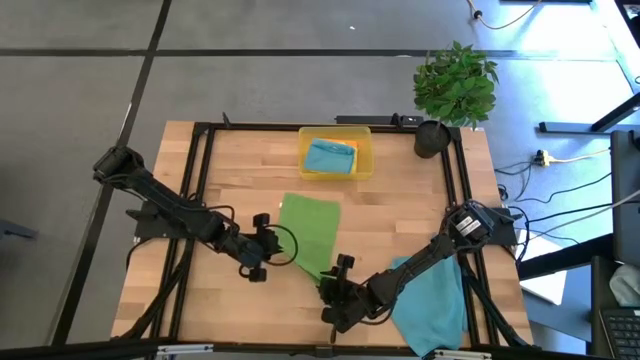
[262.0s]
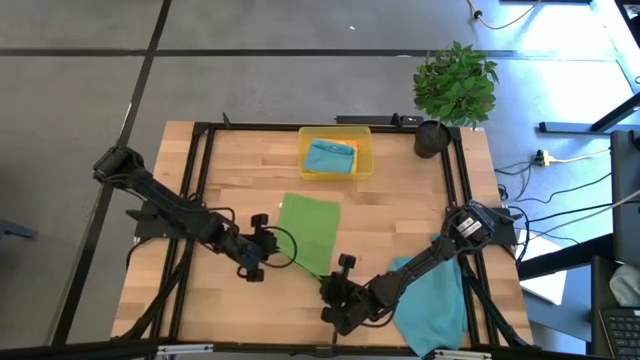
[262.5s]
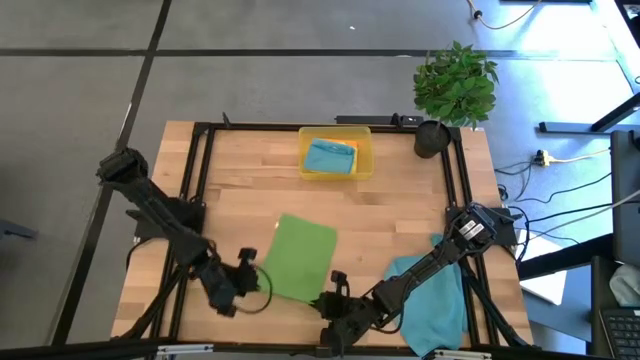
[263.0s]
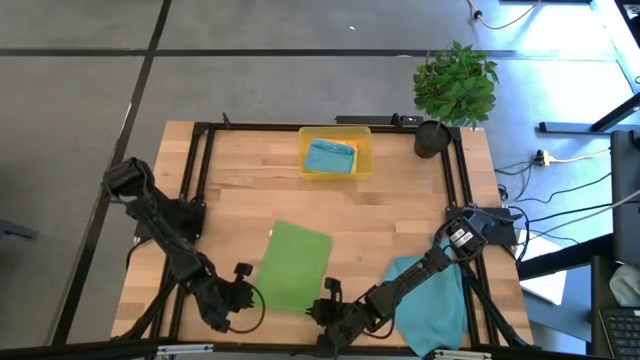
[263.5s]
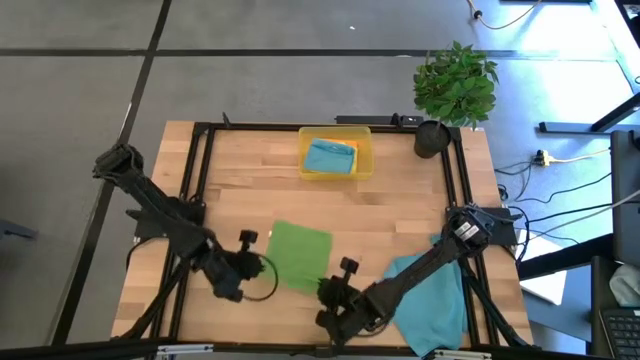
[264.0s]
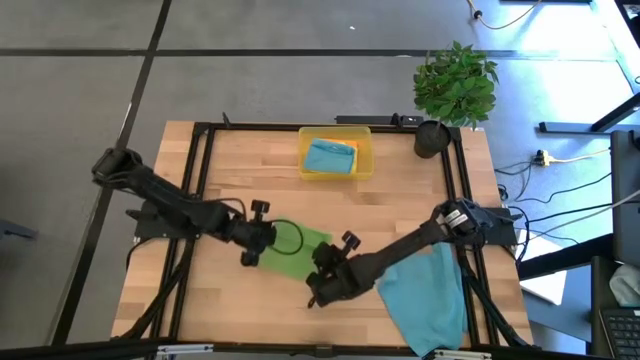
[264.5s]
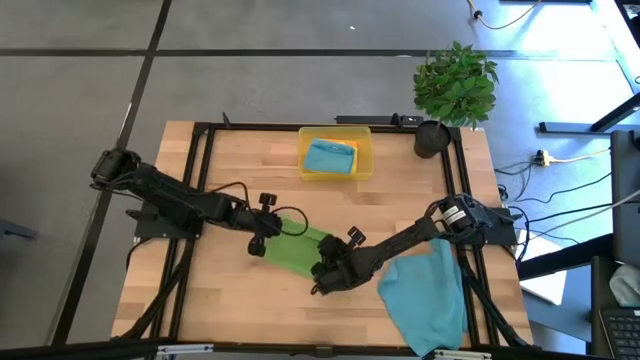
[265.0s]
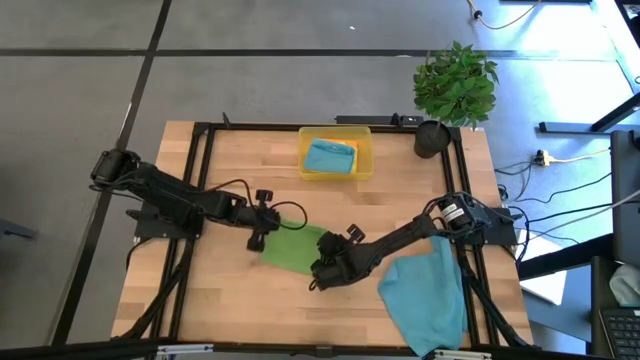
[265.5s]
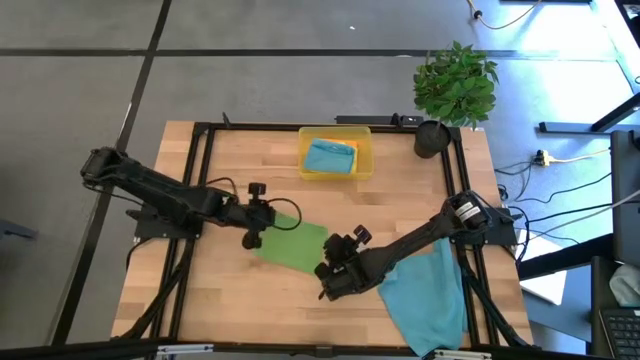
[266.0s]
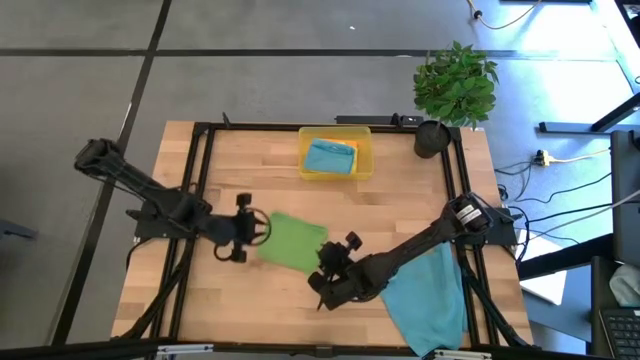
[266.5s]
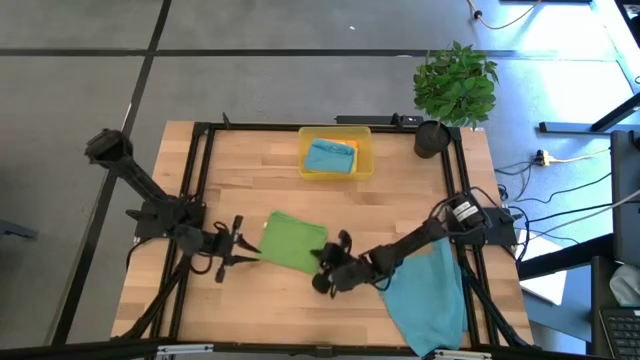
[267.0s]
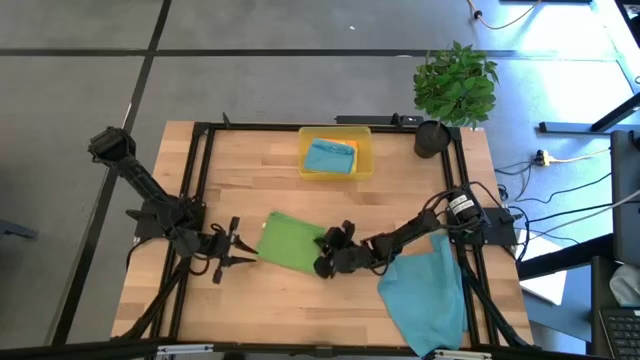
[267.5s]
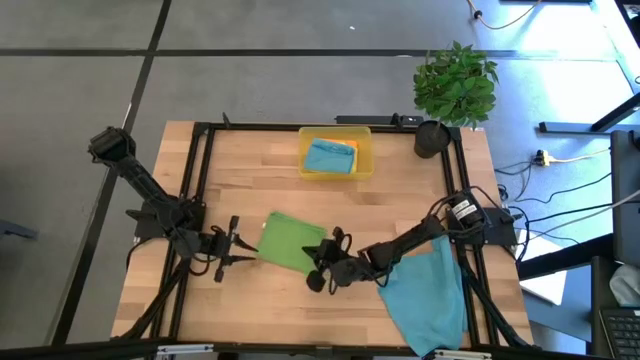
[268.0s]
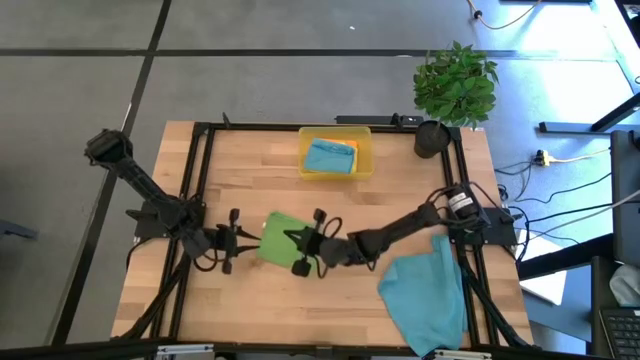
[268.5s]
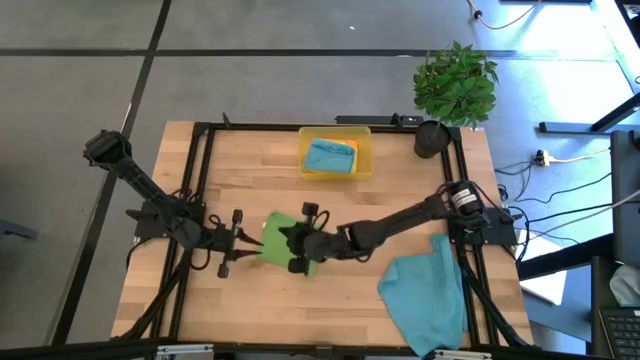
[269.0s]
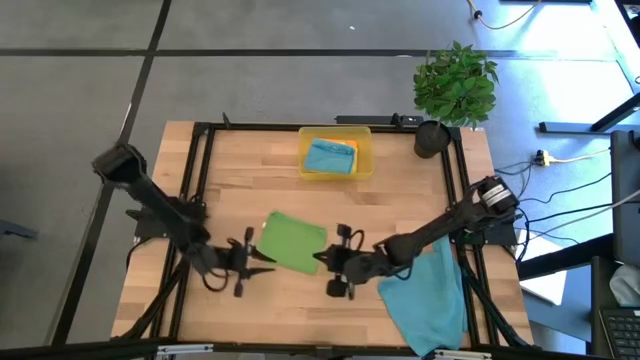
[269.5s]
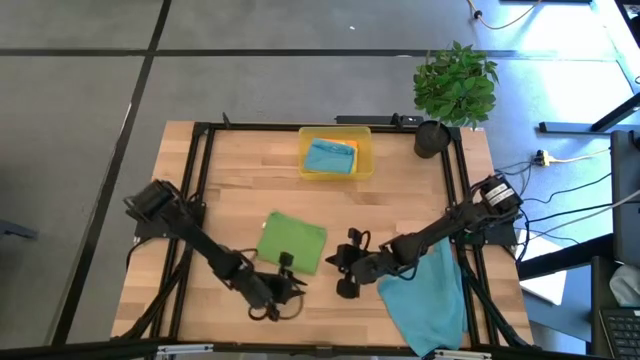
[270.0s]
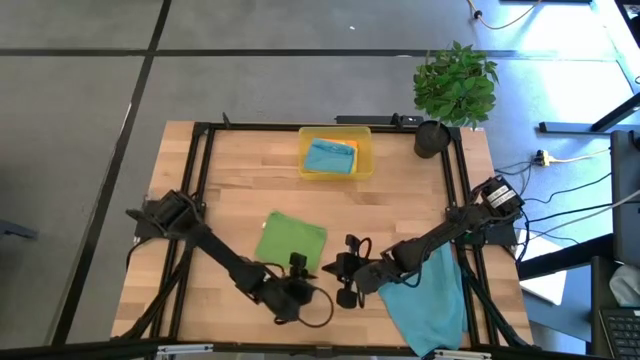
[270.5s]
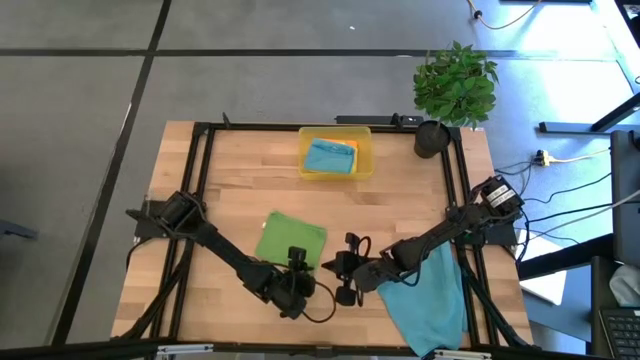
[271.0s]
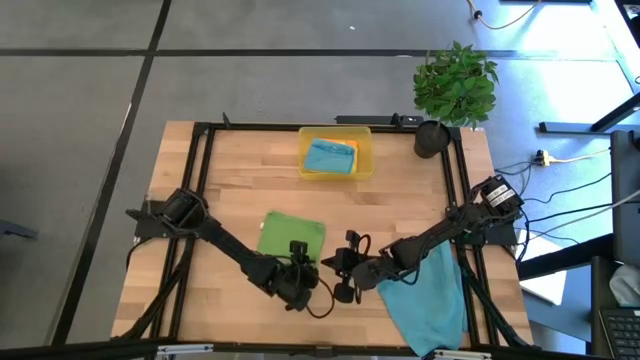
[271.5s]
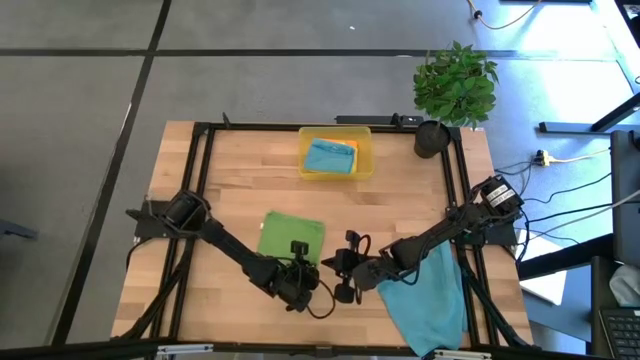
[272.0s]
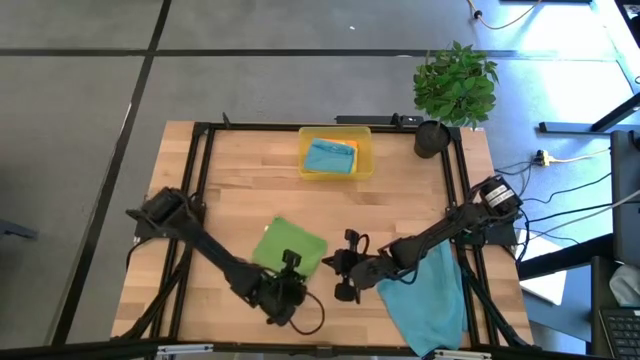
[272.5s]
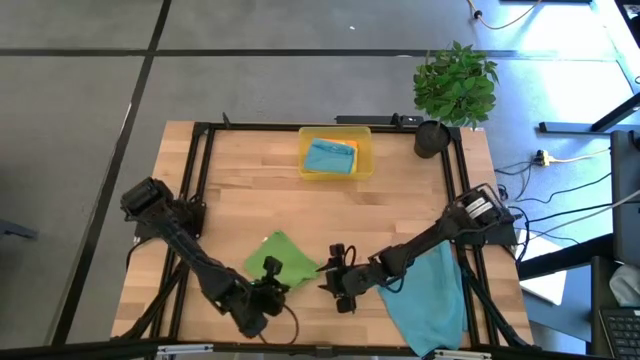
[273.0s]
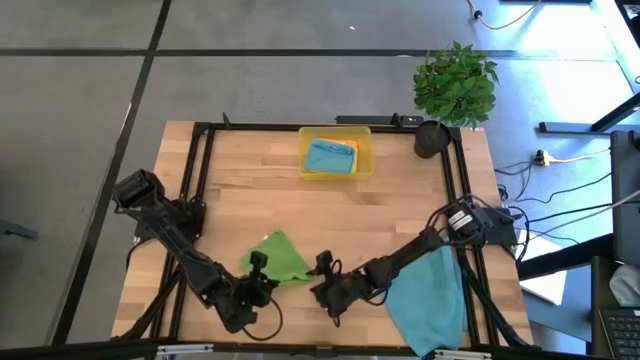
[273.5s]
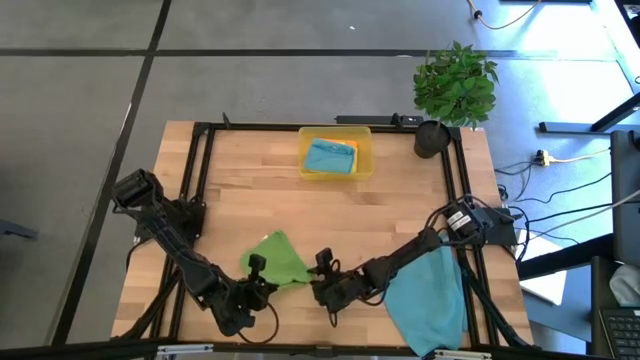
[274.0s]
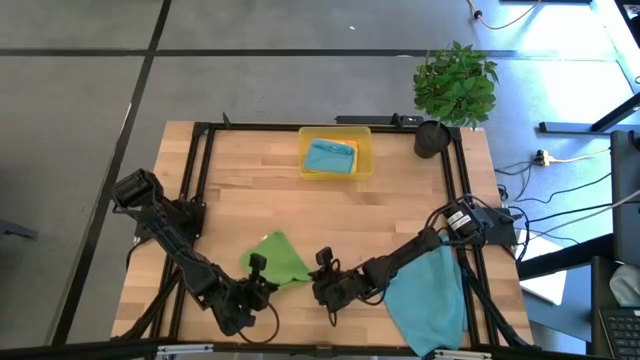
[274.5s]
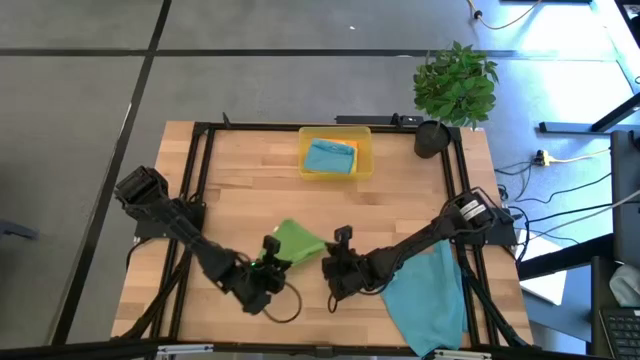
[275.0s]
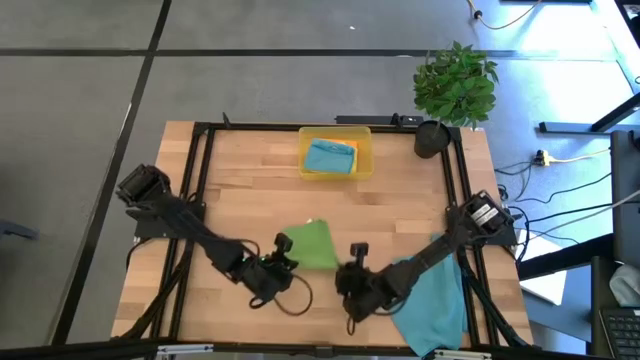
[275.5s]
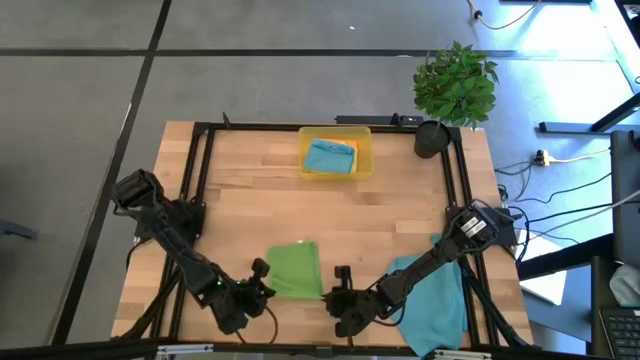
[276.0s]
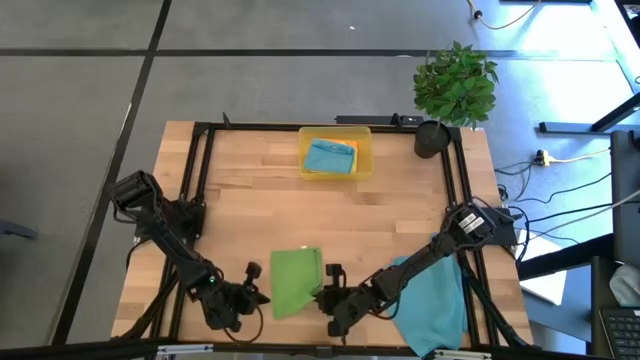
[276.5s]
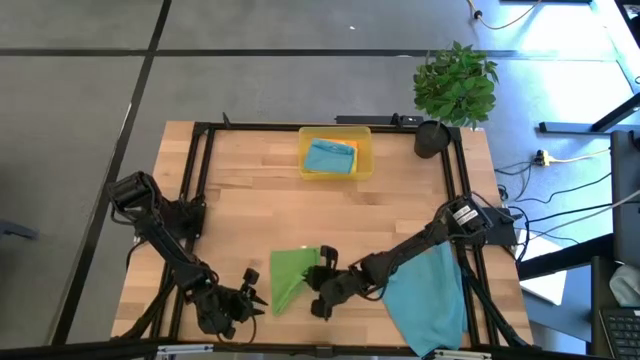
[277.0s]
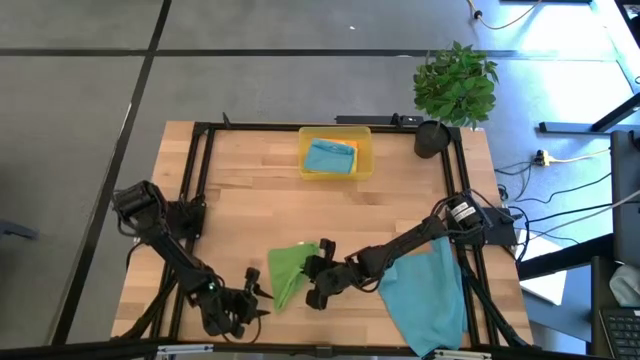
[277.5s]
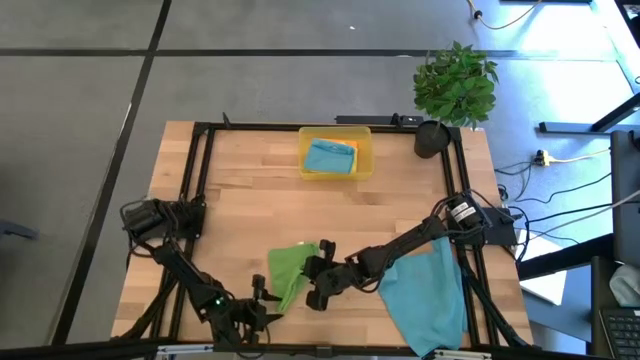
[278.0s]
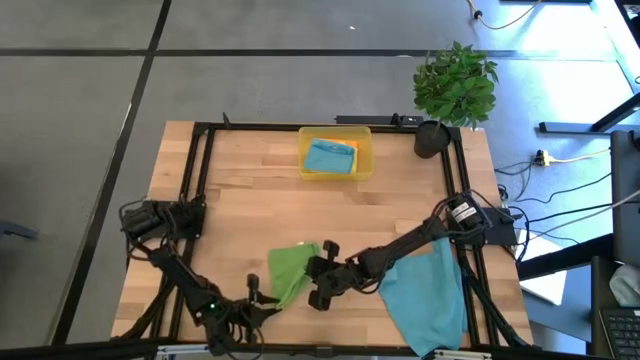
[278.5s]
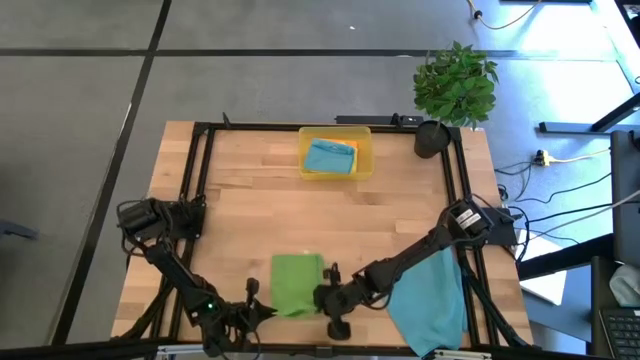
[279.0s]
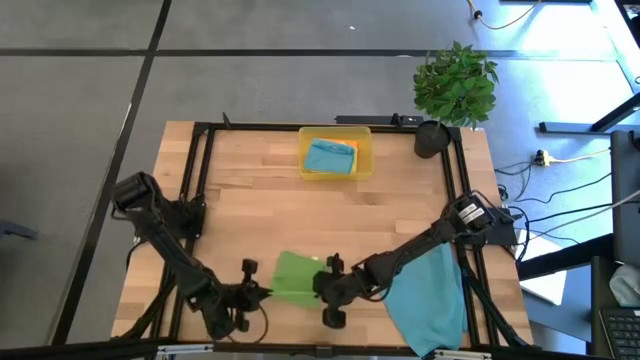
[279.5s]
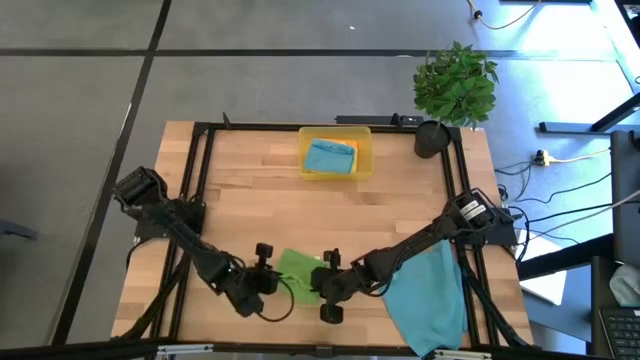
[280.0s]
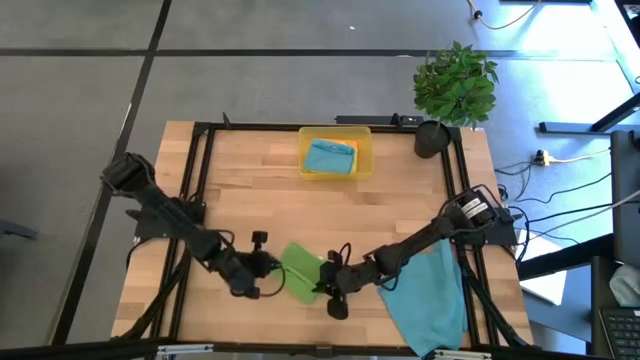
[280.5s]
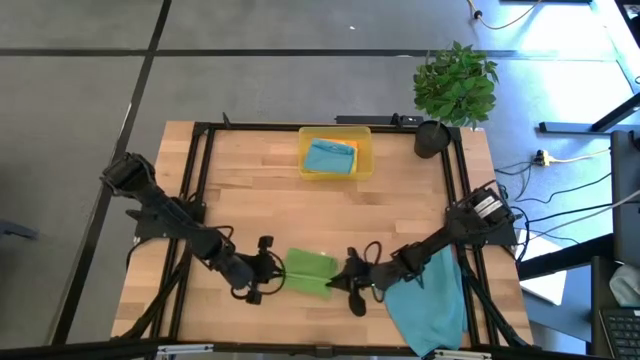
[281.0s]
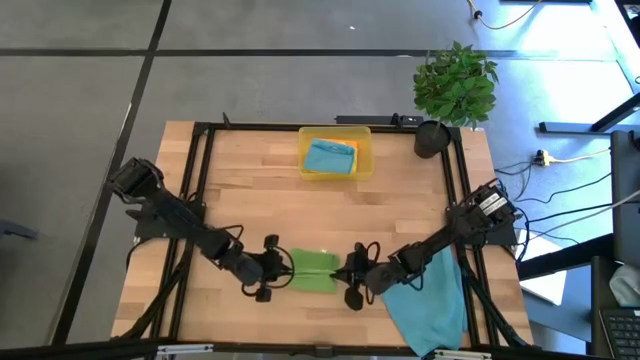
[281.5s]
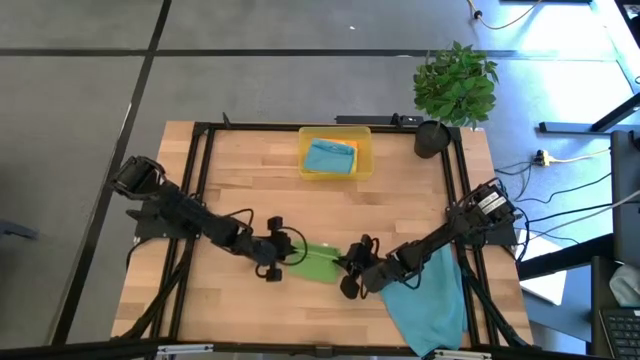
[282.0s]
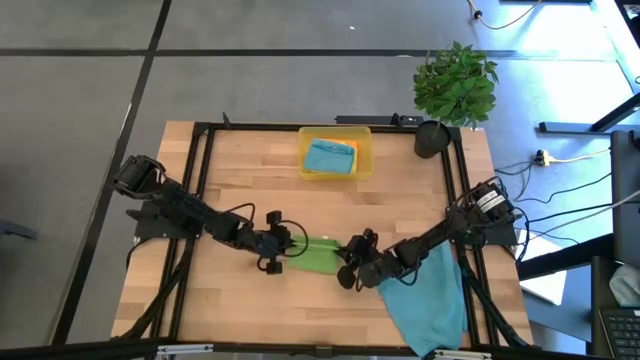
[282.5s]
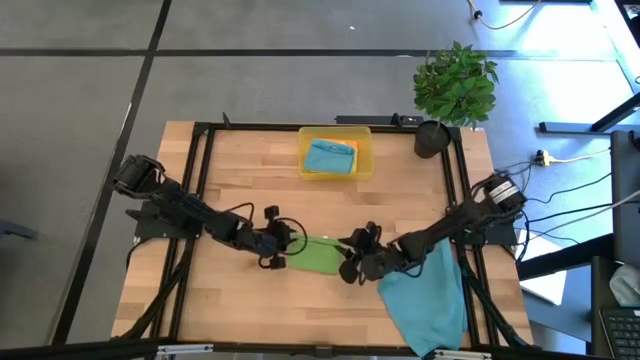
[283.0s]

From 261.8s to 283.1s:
Task: Fold microfiber towels
Fold the green microfiber cloth

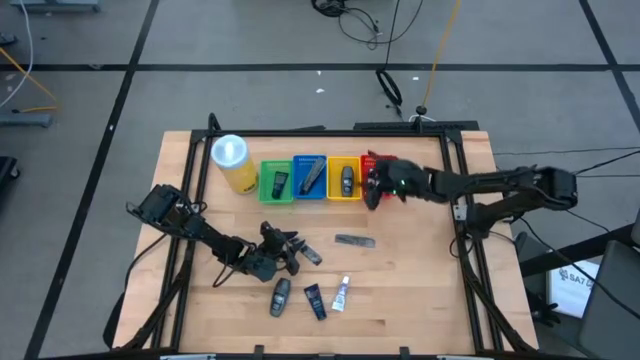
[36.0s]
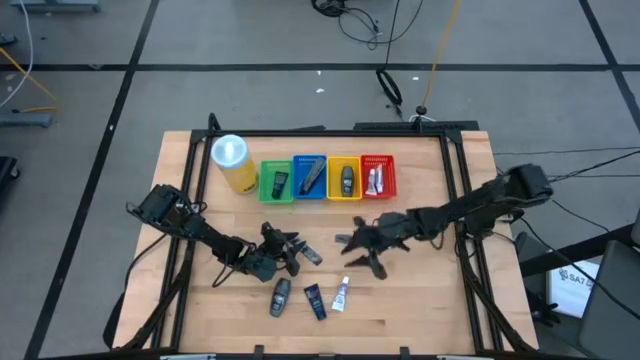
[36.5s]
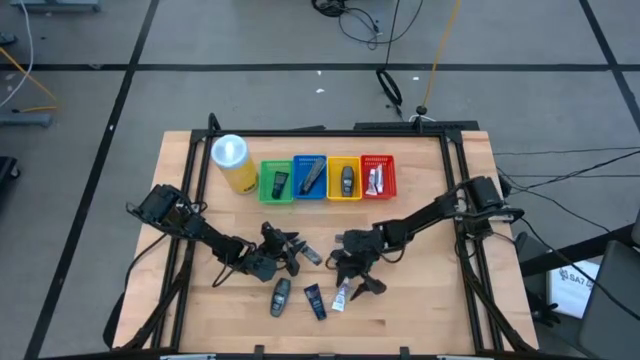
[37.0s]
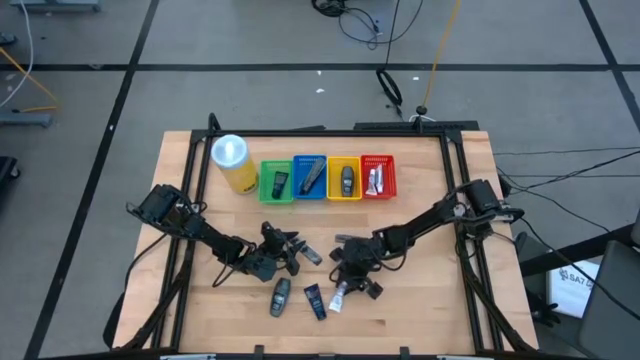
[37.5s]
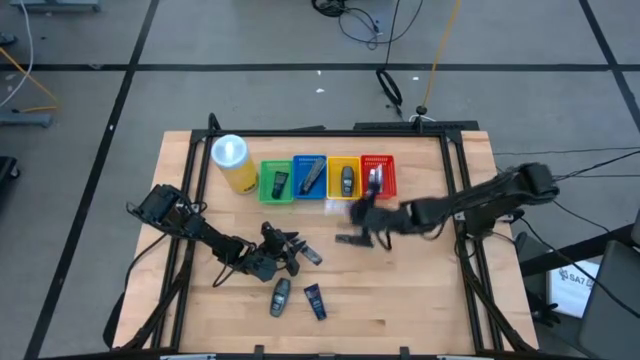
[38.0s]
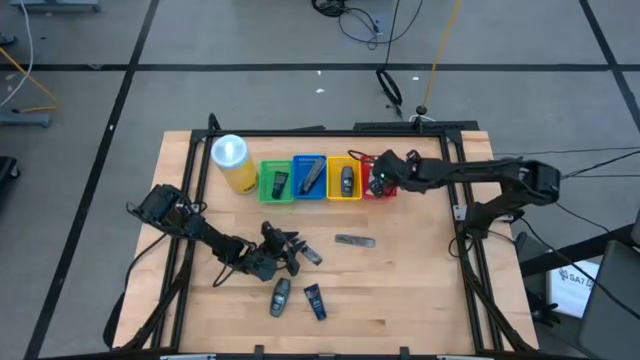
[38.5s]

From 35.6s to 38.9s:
Task: Pick & Place Travel size toiletries
Put the toothpaste into the red basket
